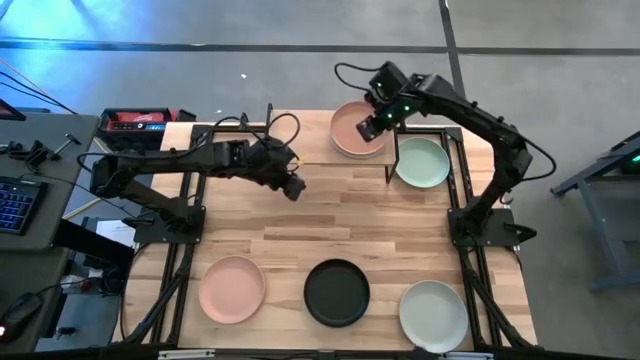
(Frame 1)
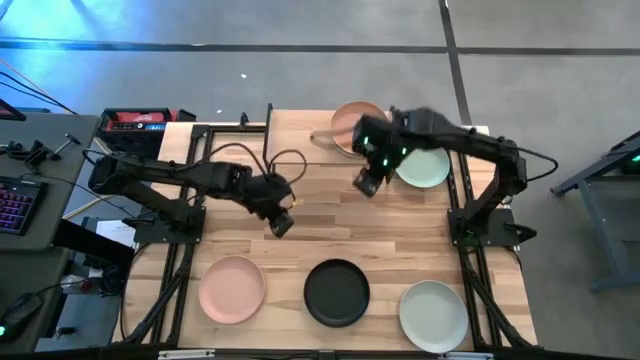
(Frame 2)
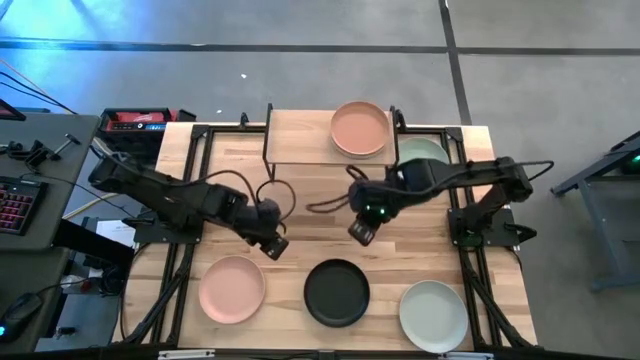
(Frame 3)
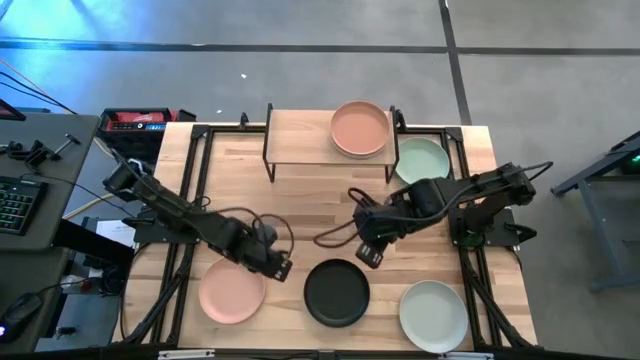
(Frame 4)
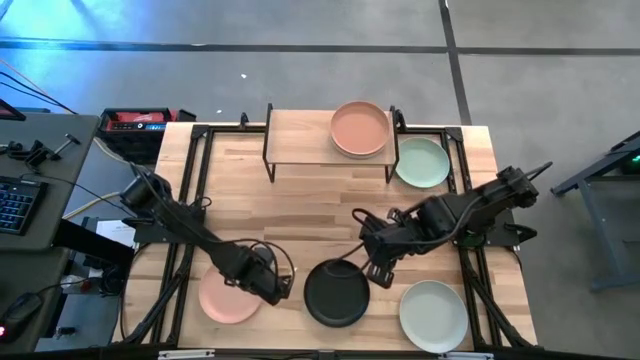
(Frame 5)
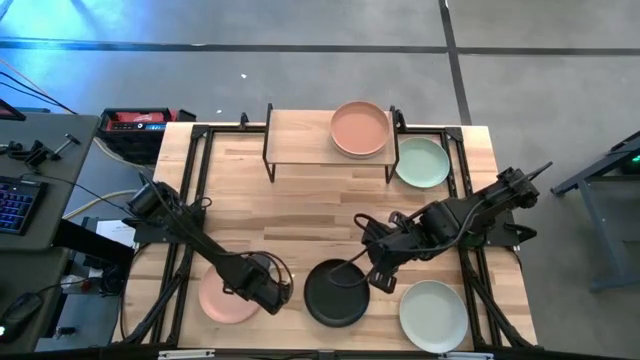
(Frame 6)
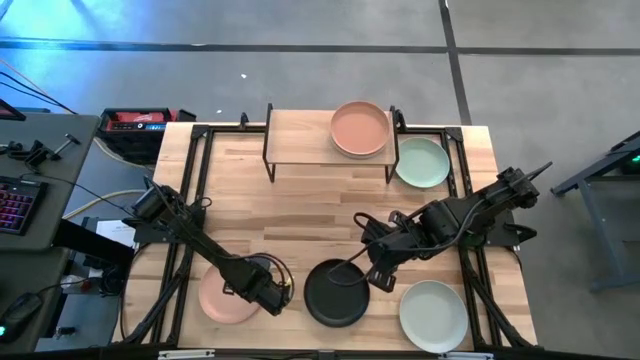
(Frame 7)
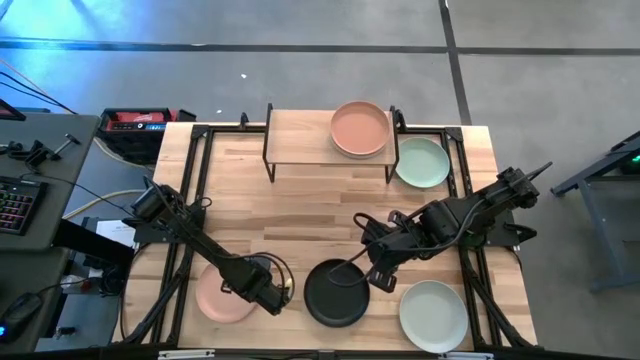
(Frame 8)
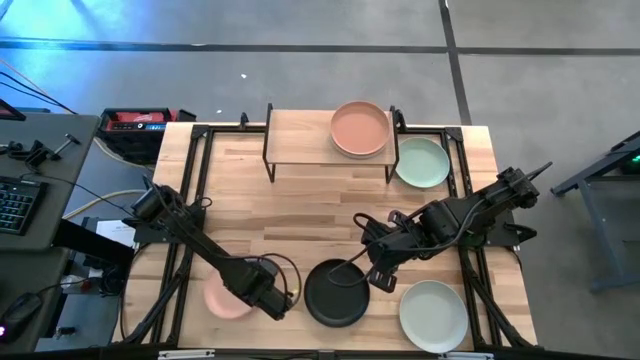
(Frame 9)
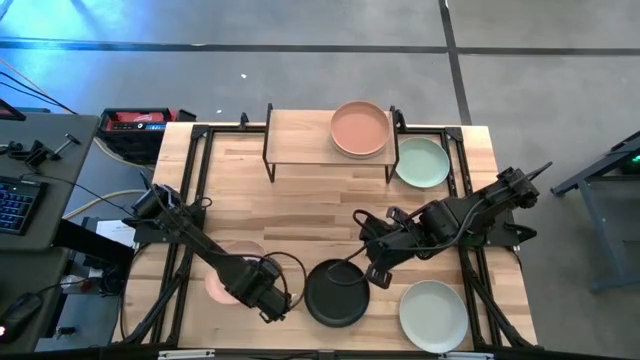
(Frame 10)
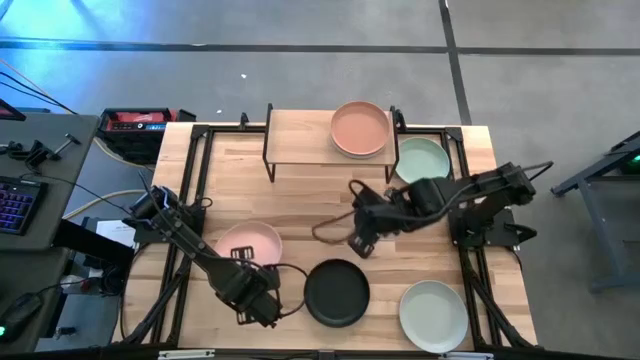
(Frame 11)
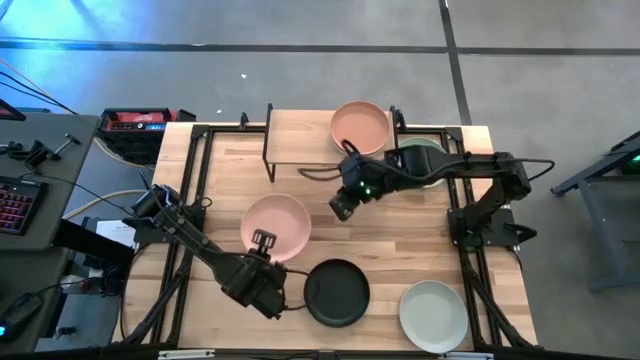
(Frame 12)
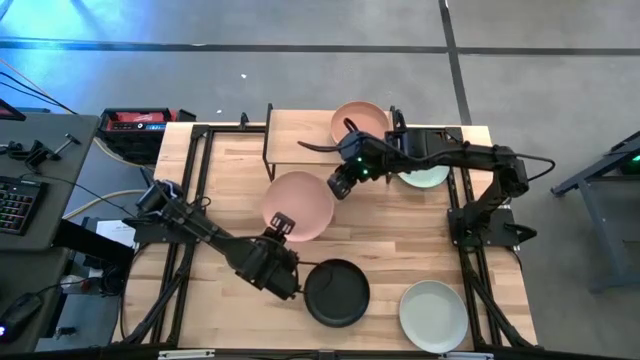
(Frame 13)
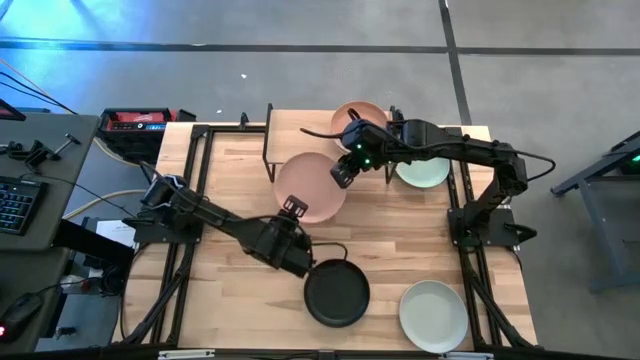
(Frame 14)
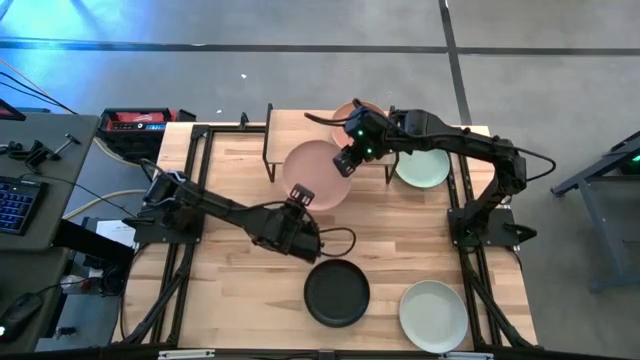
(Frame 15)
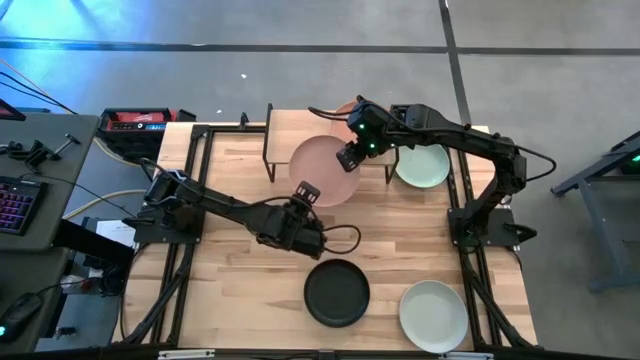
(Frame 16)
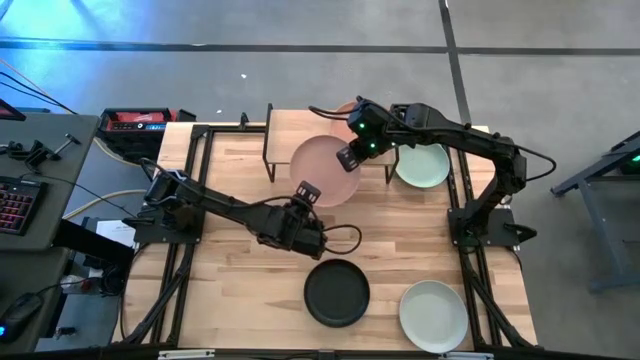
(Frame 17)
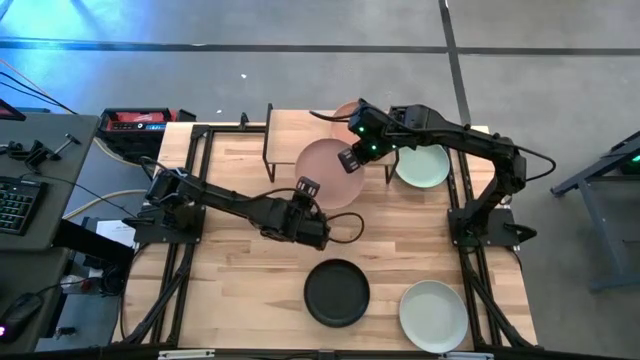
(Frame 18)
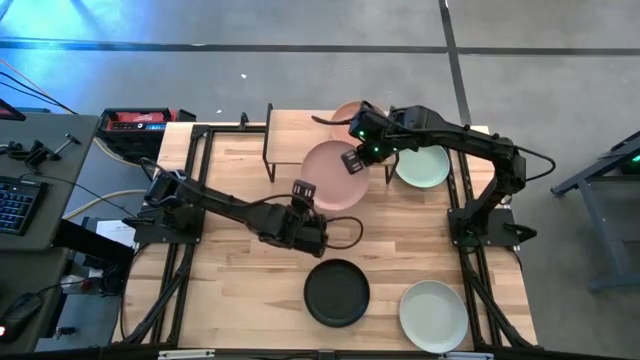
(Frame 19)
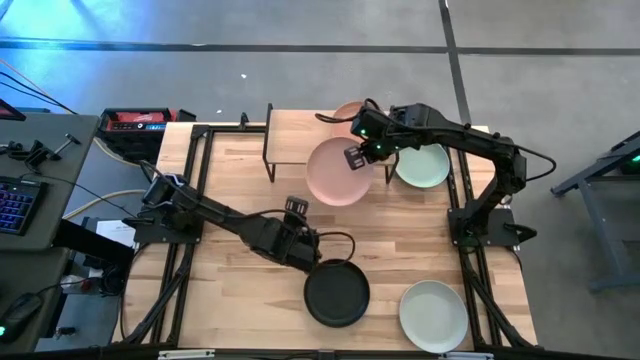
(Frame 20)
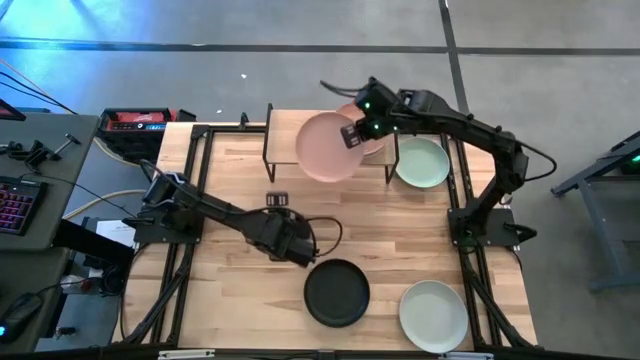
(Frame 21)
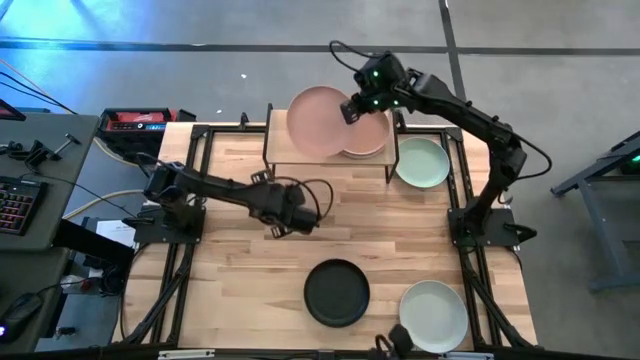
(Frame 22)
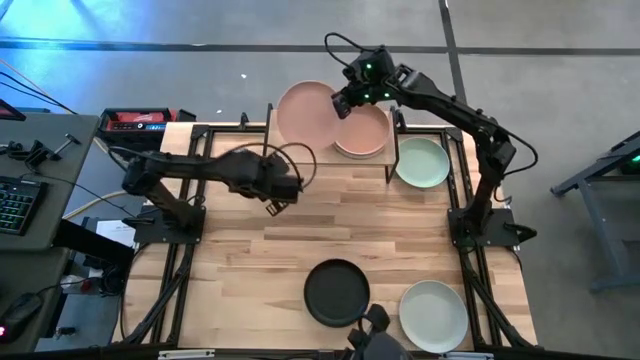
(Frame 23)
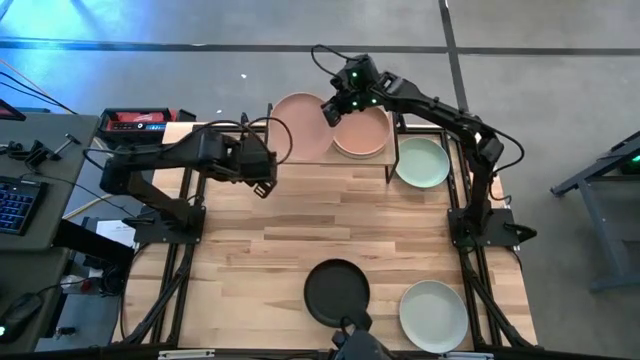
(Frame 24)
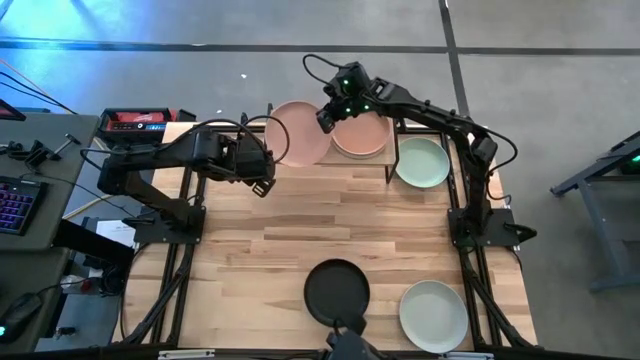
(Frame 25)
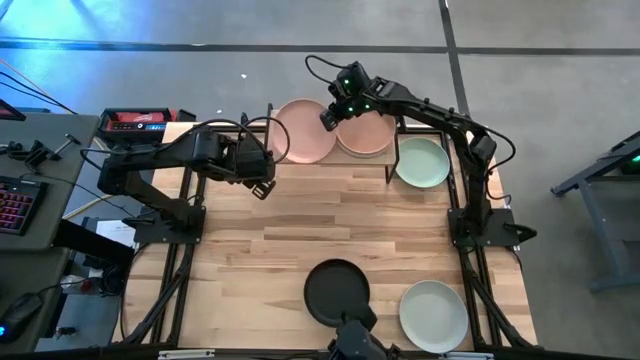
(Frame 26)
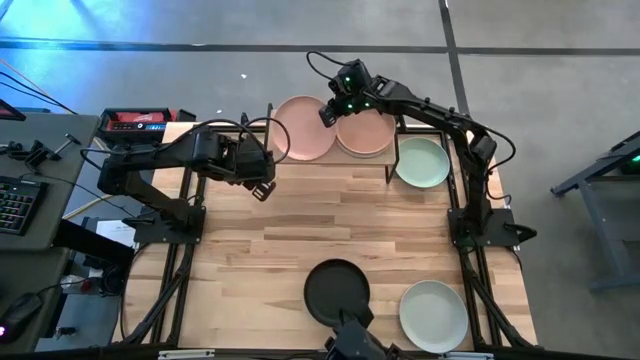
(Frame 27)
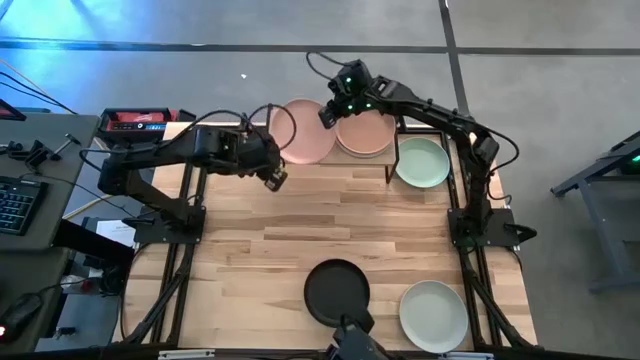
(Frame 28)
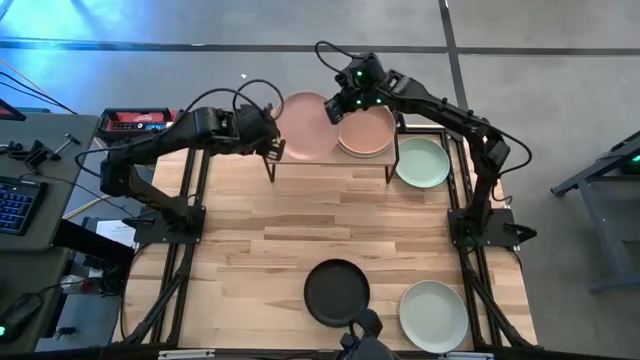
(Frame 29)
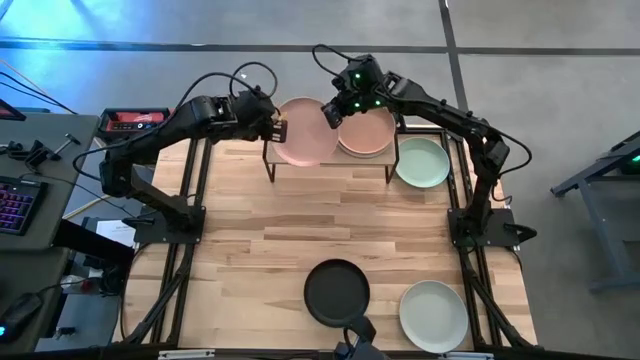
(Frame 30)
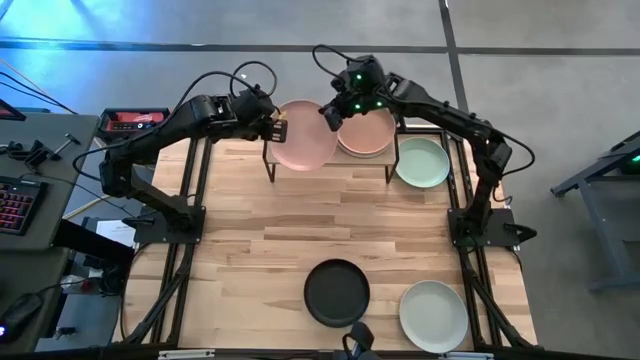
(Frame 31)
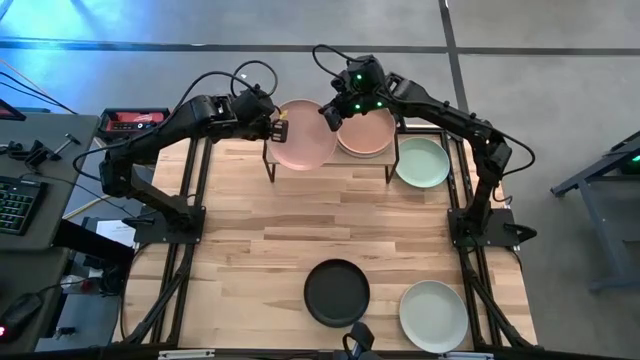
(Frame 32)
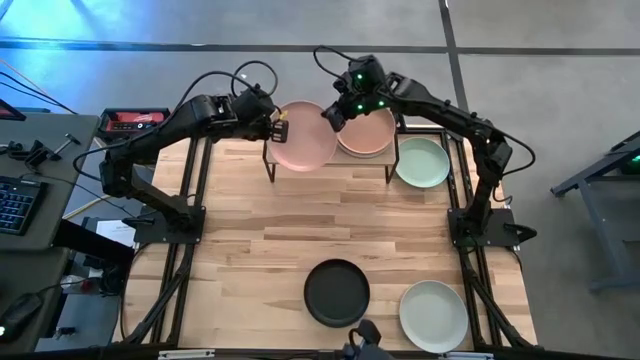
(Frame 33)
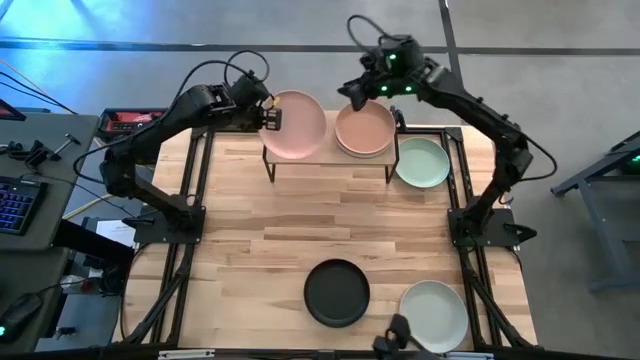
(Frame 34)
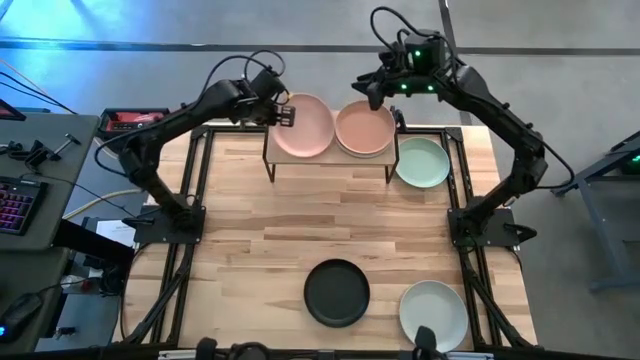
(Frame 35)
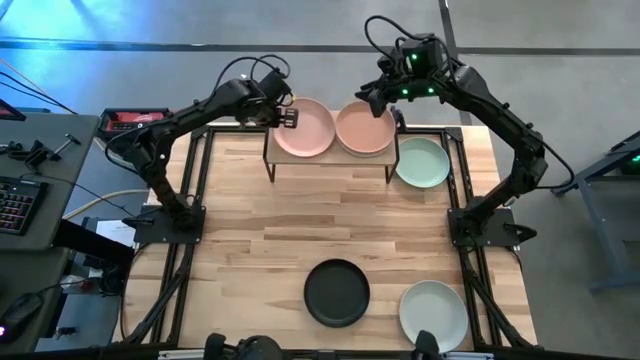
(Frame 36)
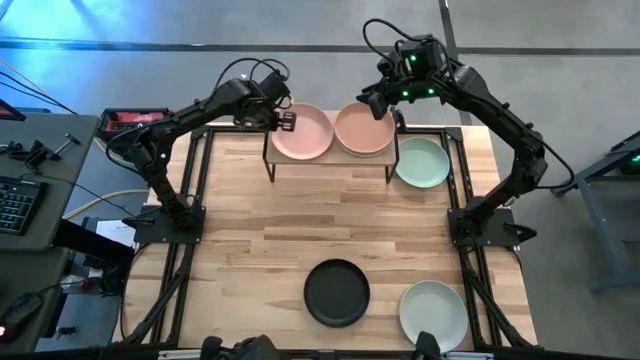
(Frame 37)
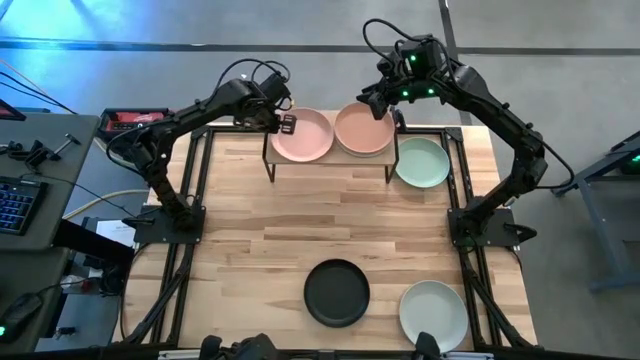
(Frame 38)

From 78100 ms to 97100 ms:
Task: Place and stack plates onto a shelf
Put the pink plate on the shelf

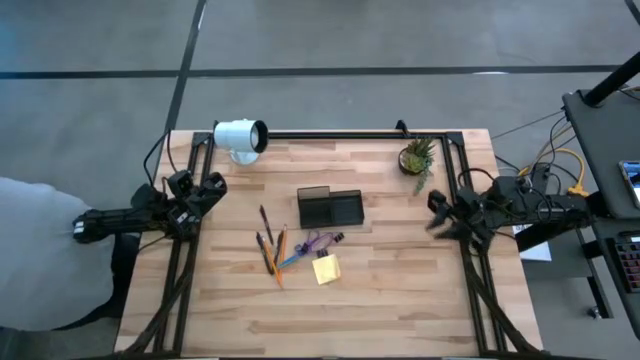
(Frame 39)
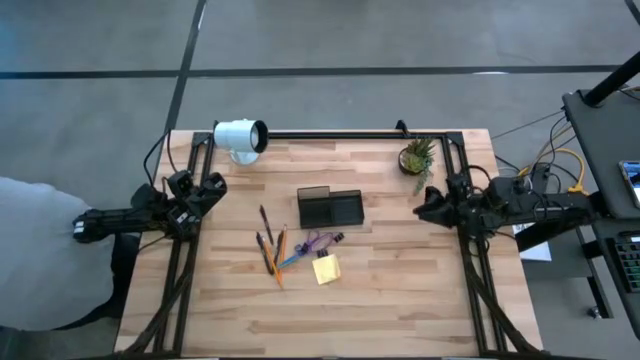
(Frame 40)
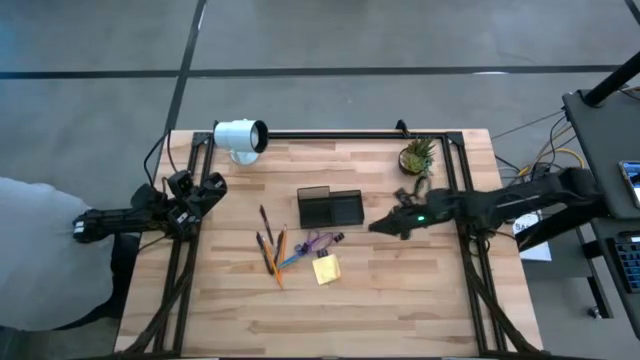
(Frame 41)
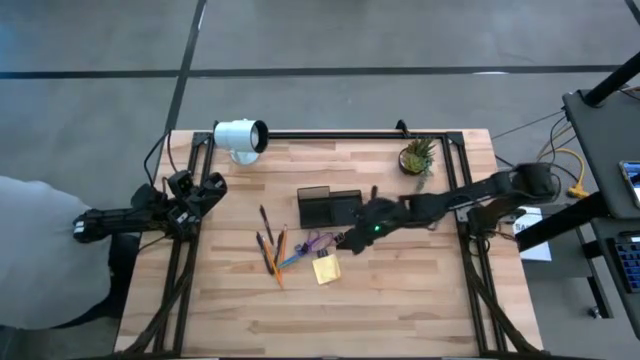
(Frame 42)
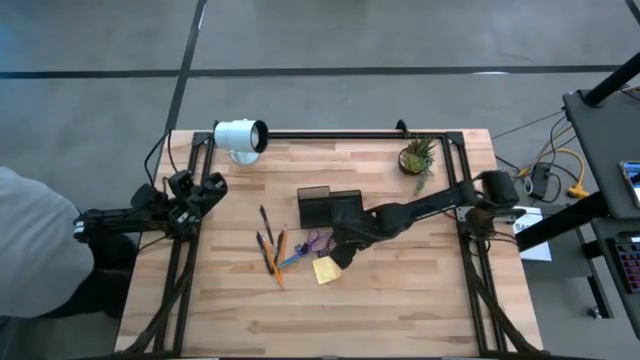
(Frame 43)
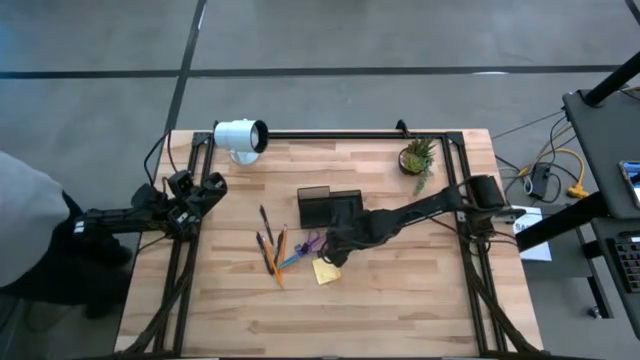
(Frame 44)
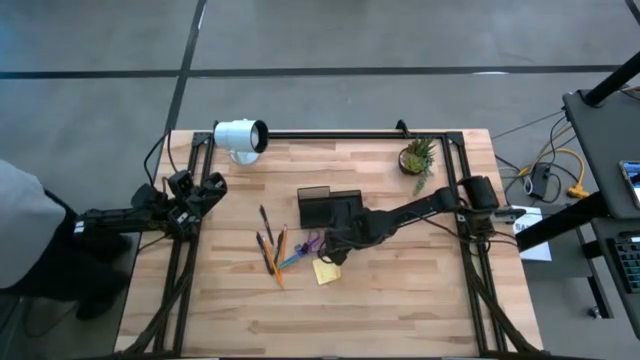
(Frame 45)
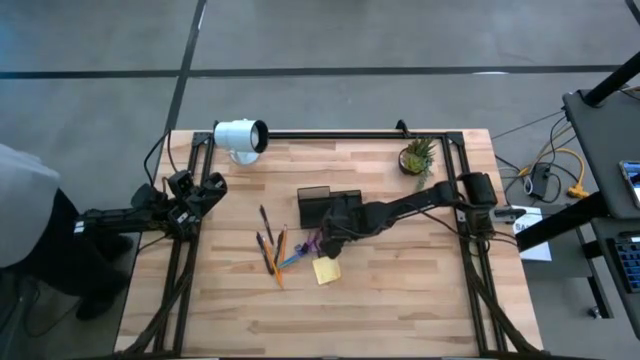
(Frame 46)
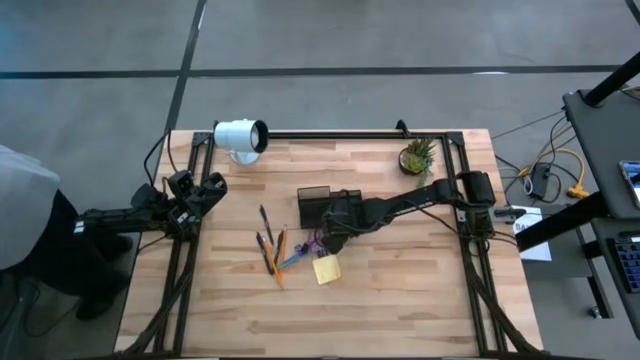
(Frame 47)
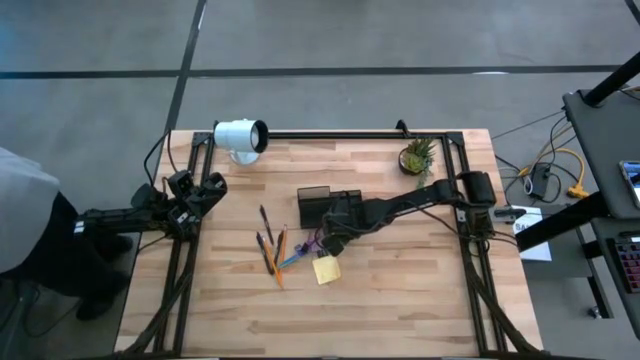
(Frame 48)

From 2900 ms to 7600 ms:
Task: Pick and place office supplies into organizer
Put the right black binder clip into the black desk organizer
